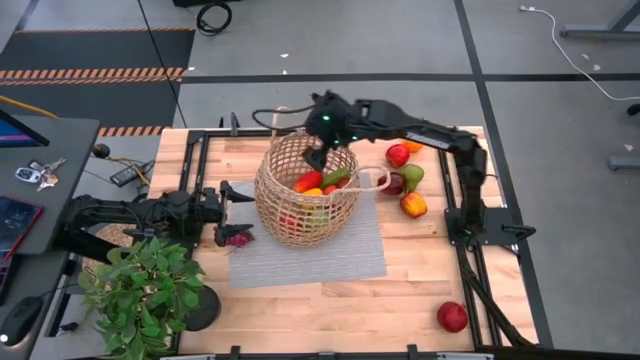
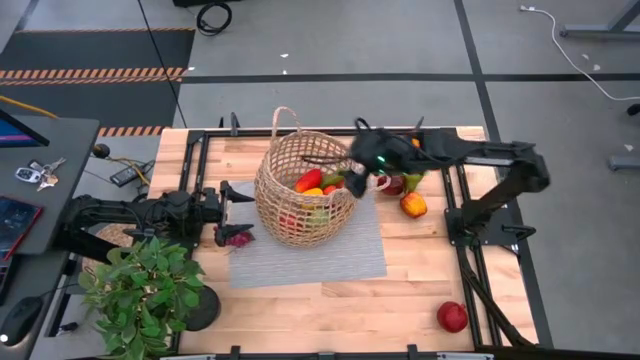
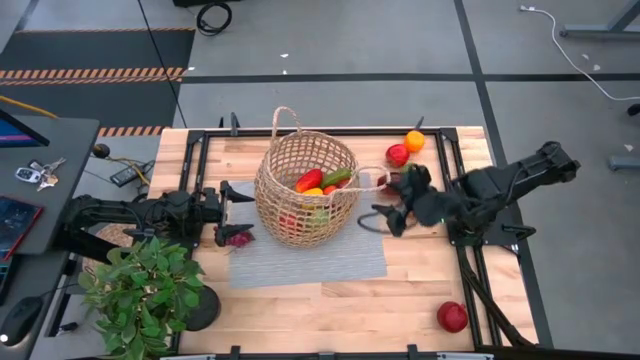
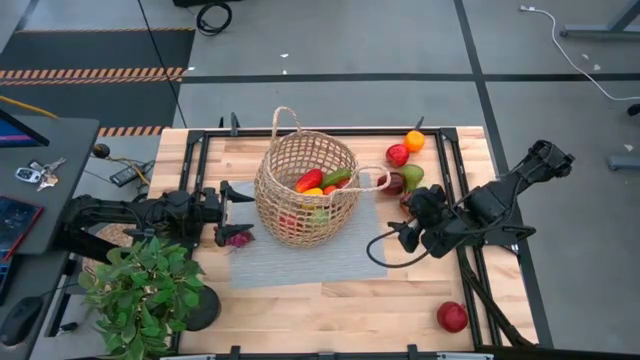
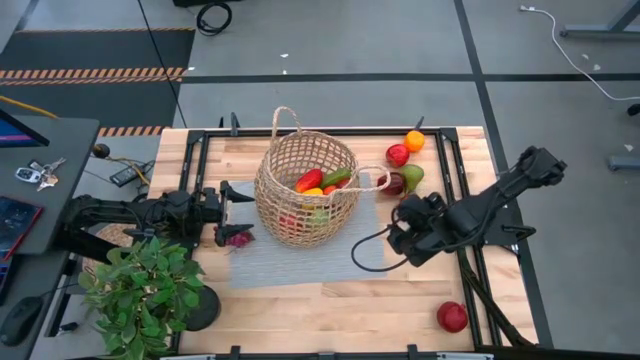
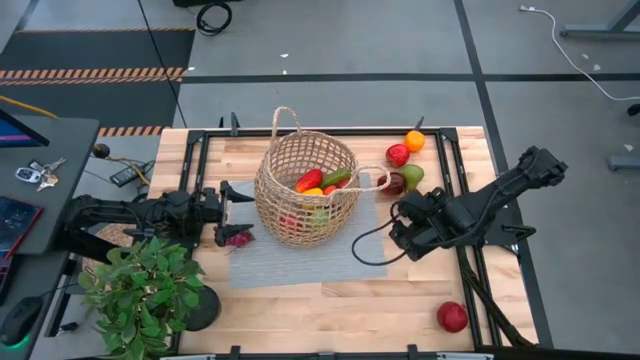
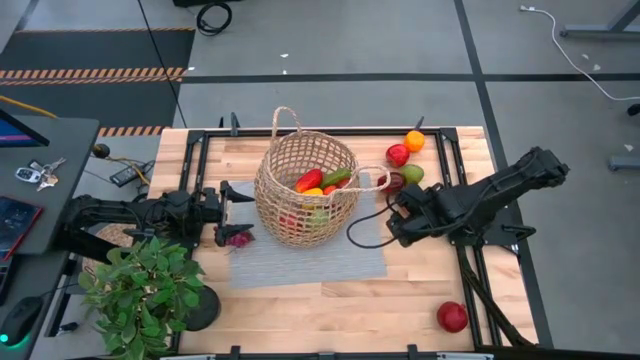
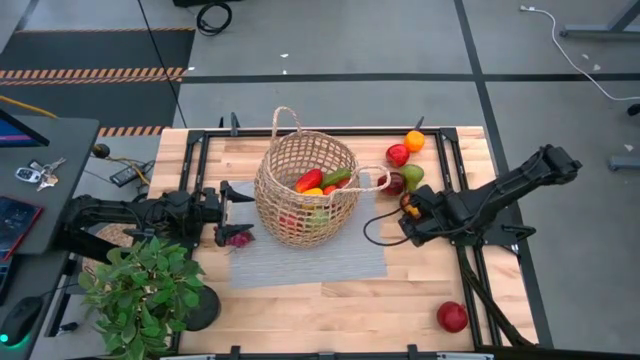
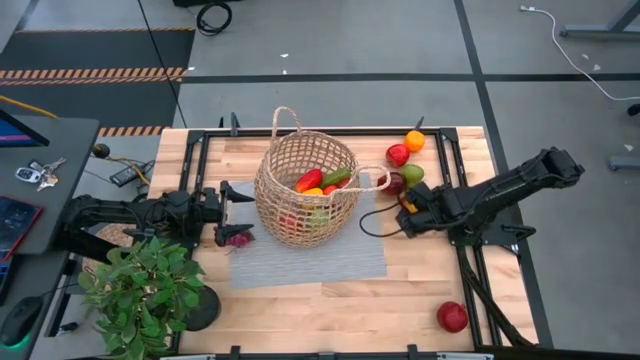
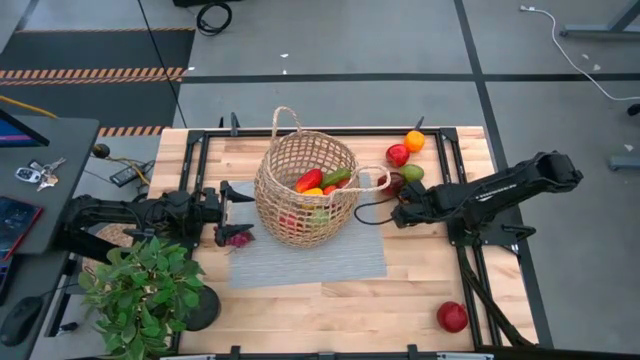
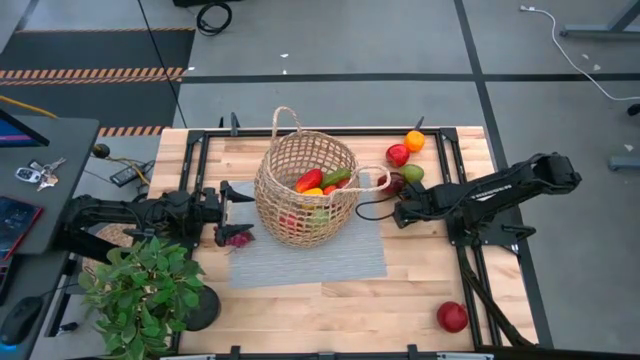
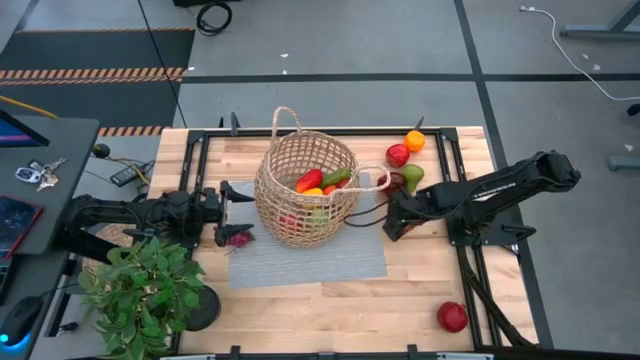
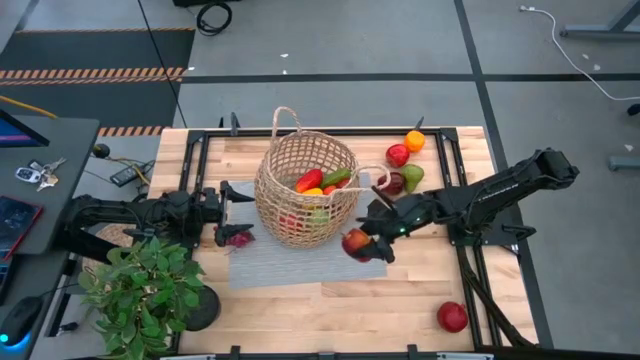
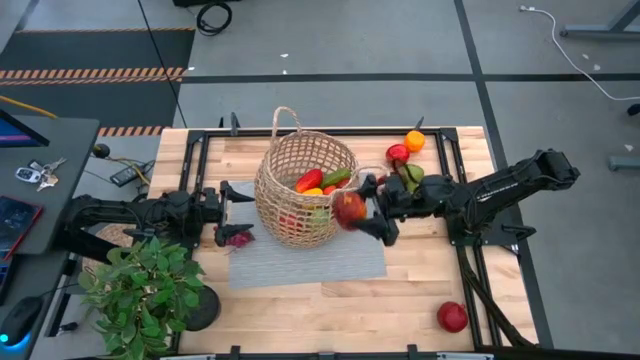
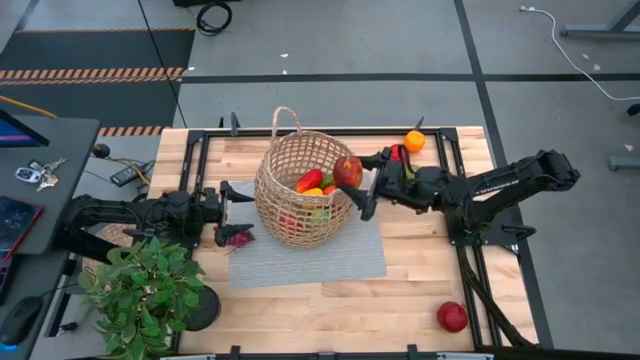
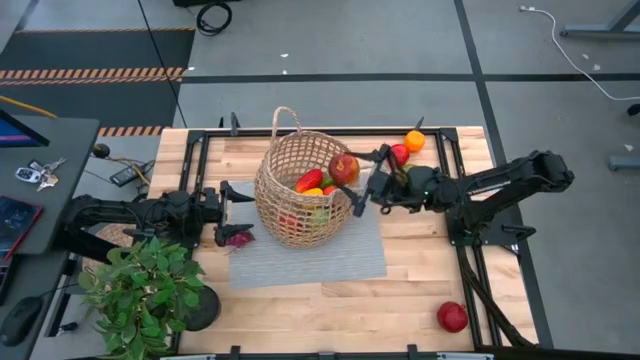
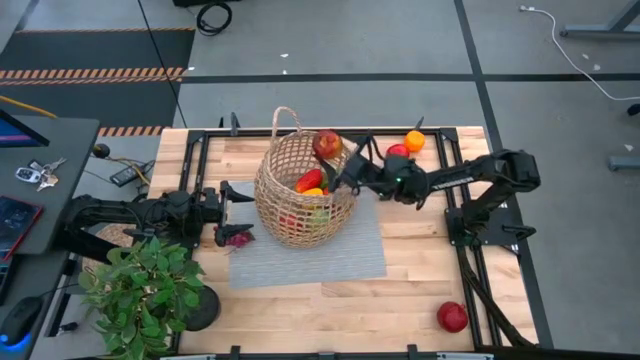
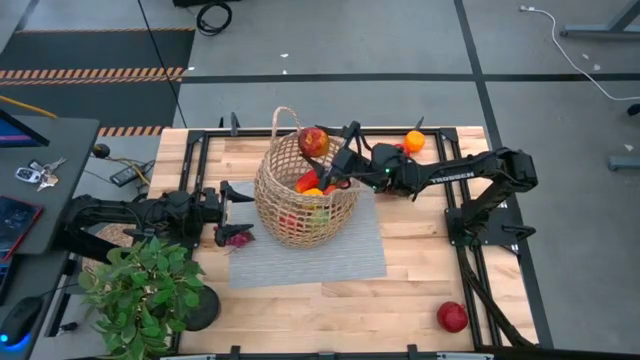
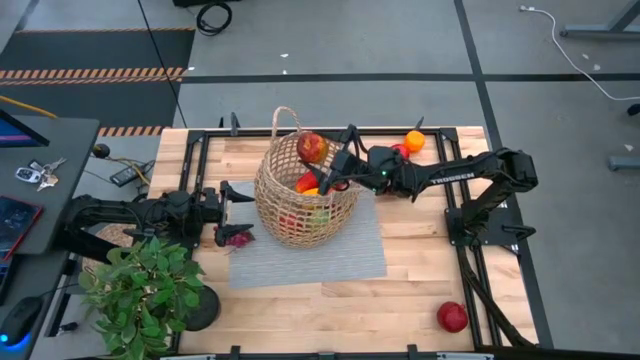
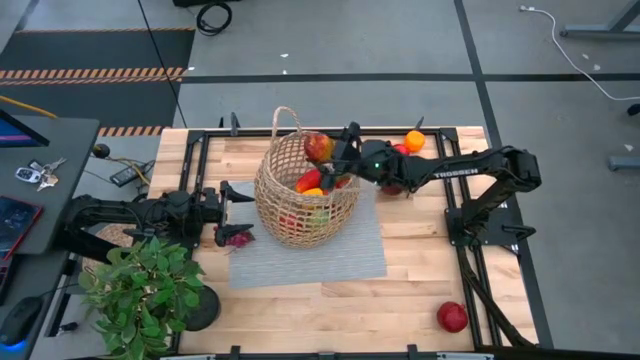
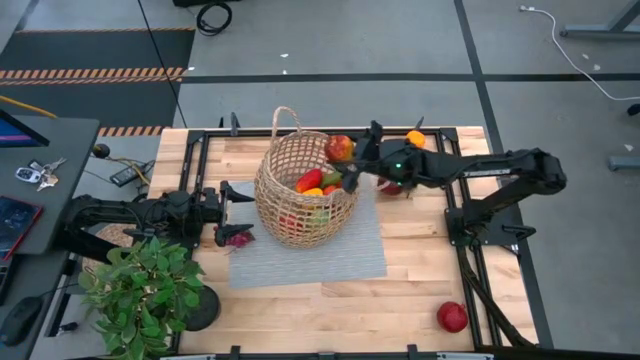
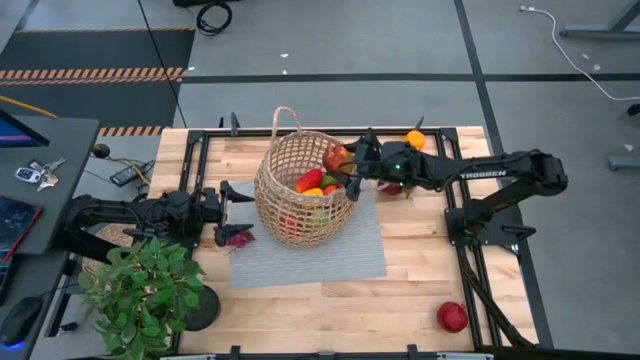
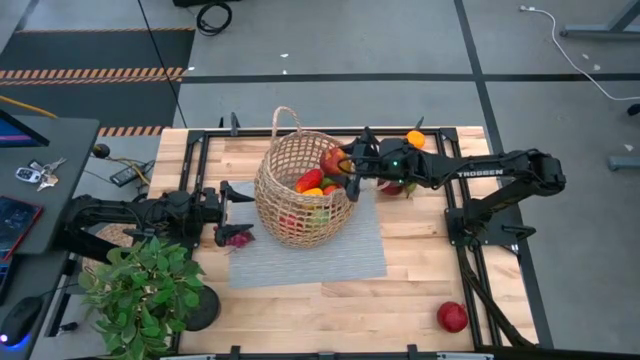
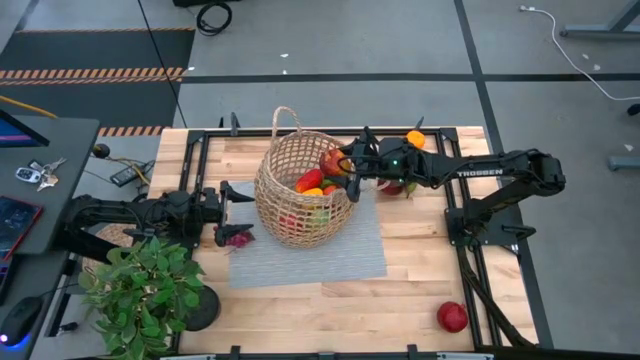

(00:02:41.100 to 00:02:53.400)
Task: Build produce basket
Put the red and yellow apple into the brown basket

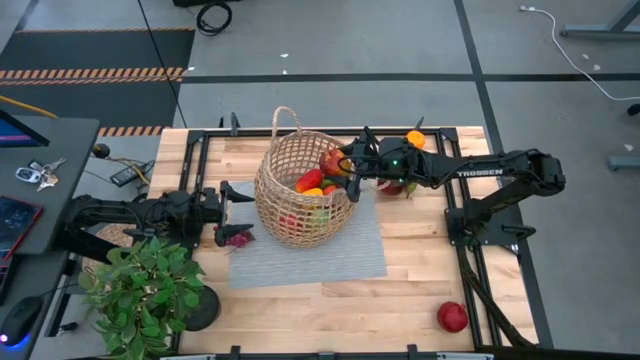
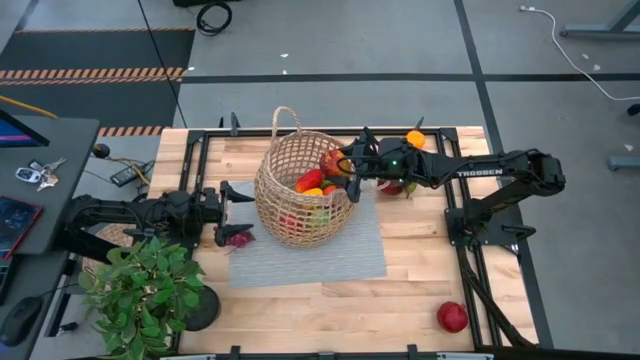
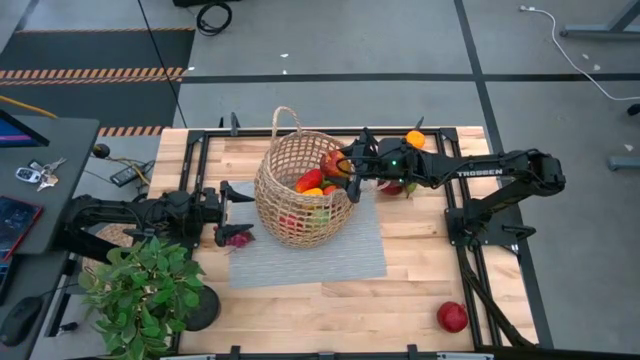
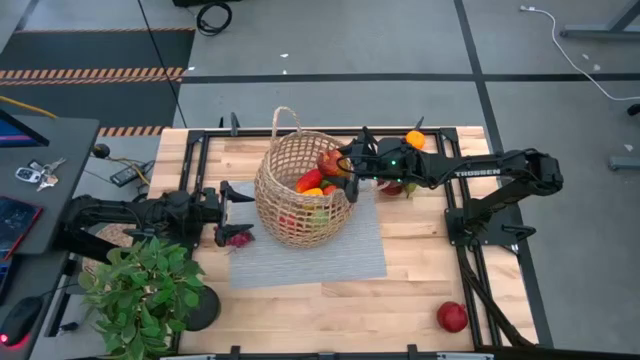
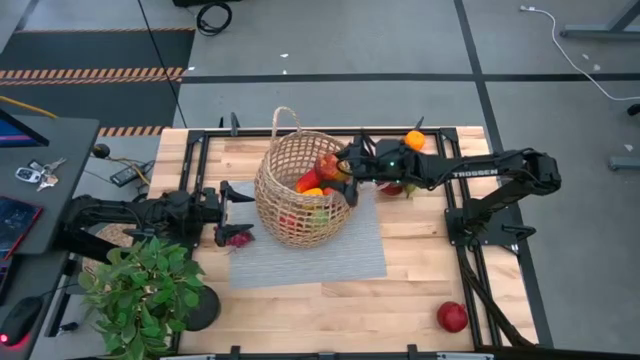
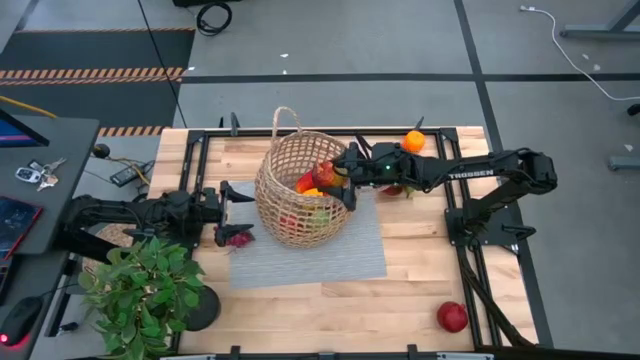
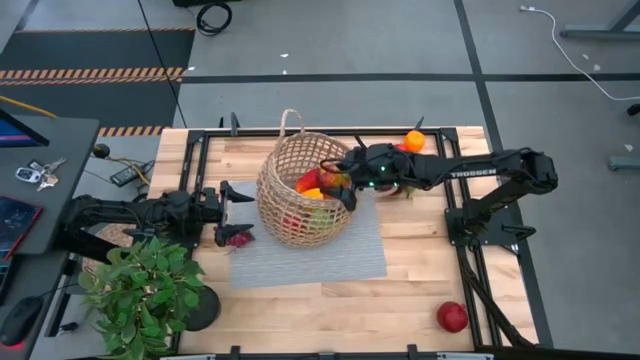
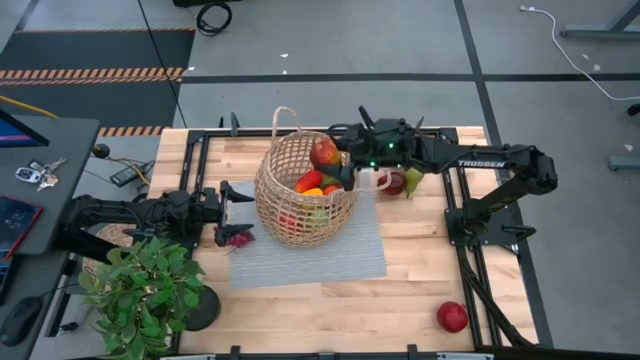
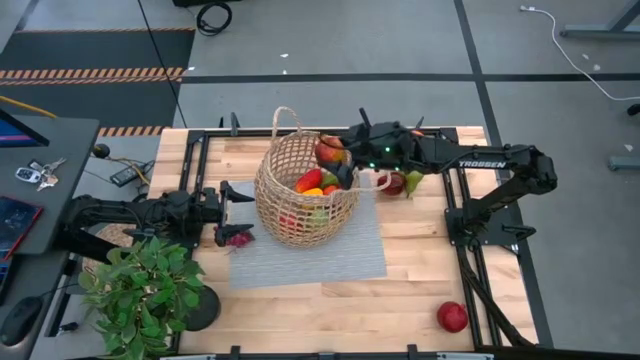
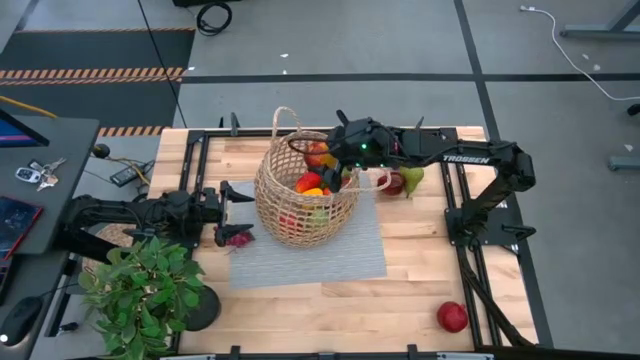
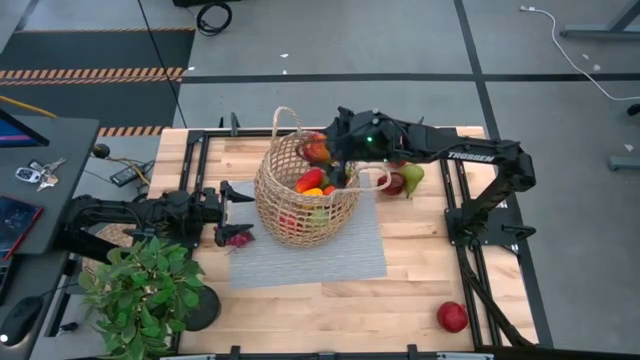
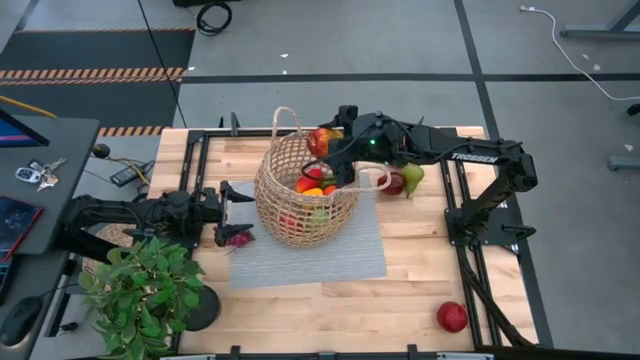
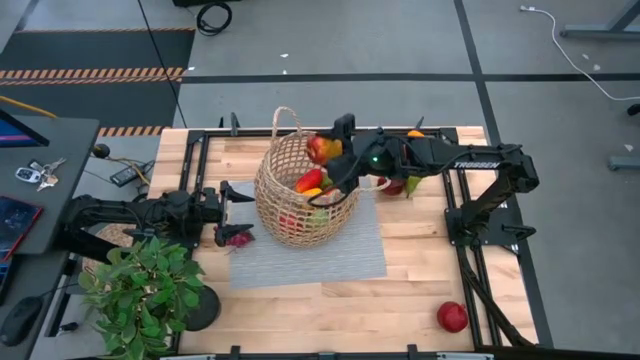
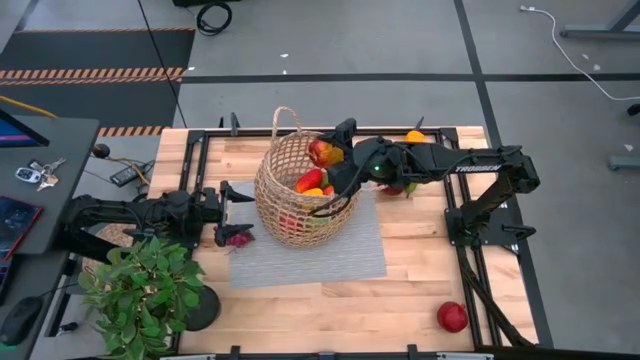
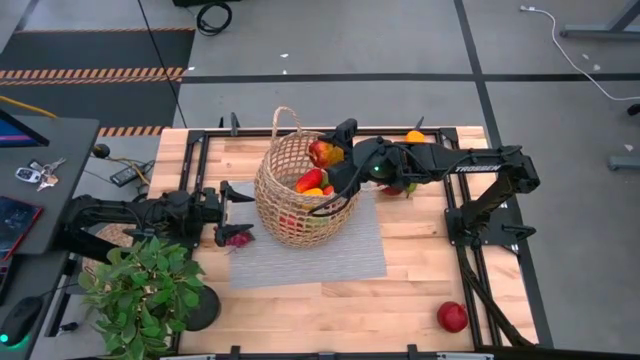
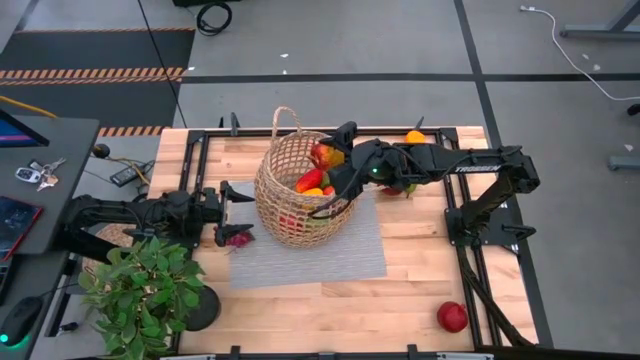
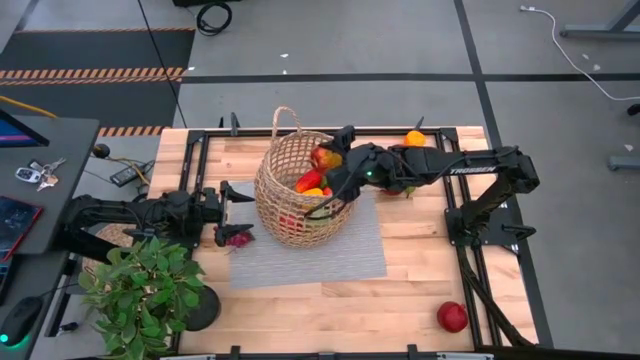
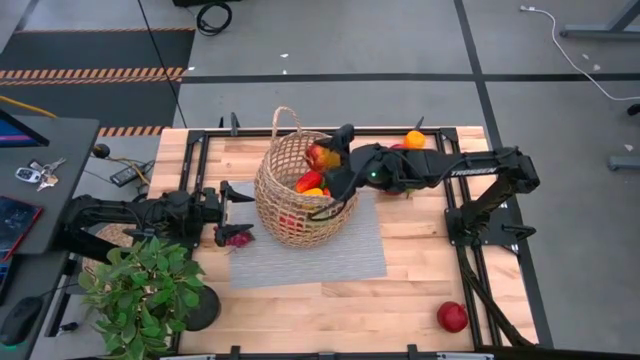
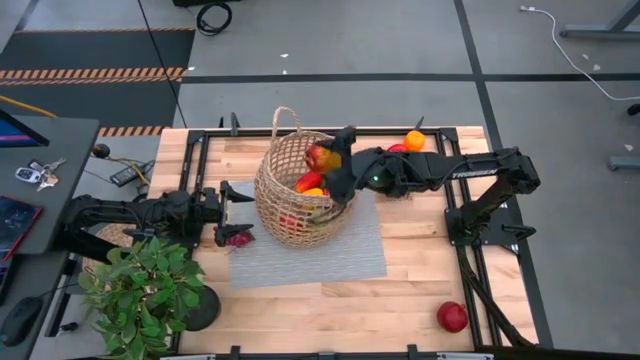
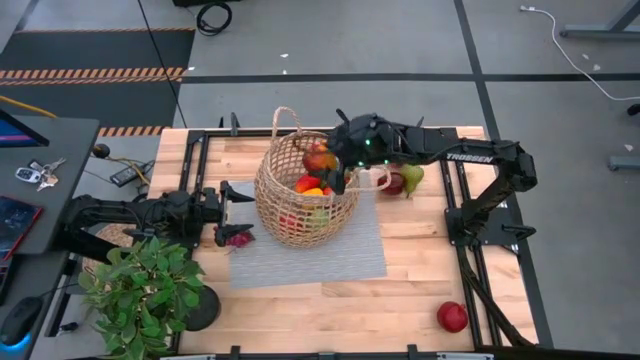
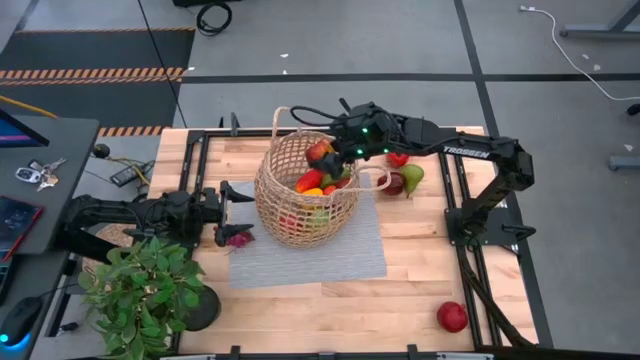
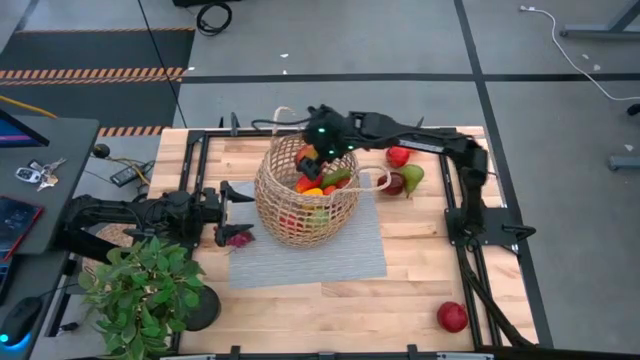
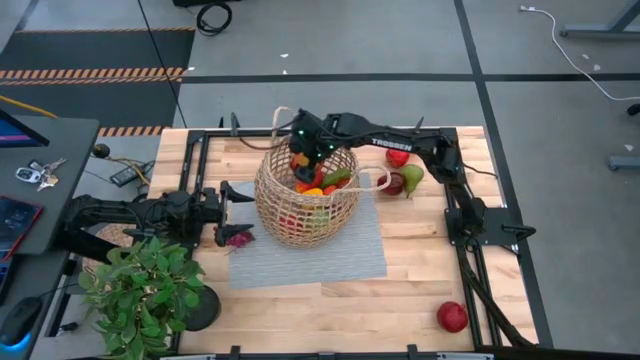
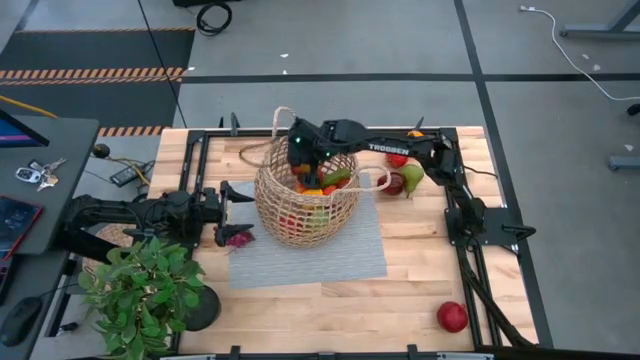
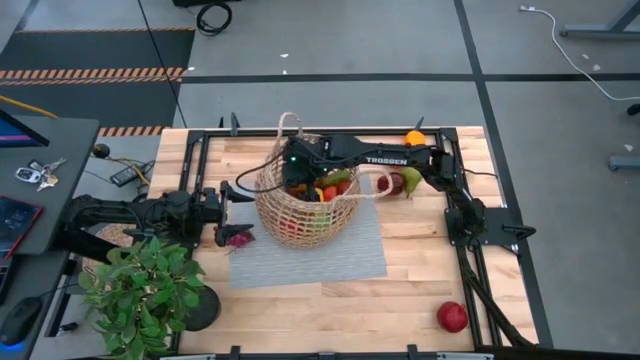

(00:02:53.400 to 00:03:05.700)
Put the red and yellow apple into the brown basket
